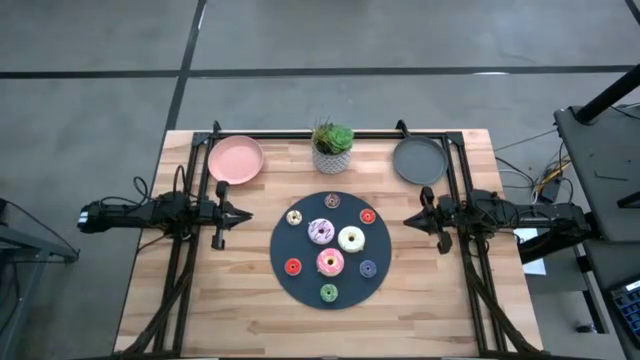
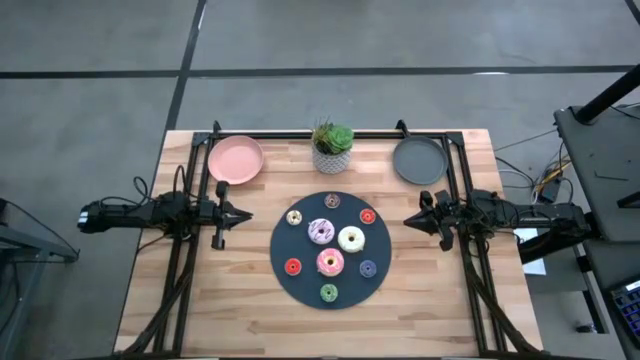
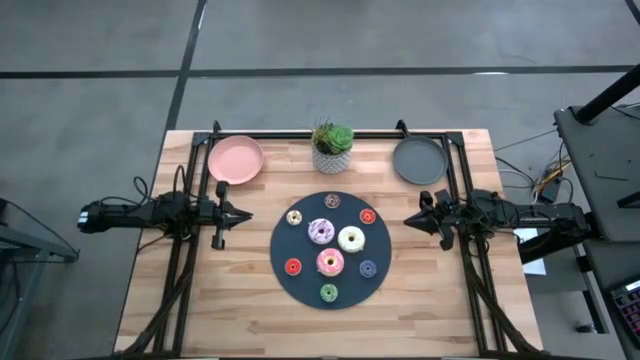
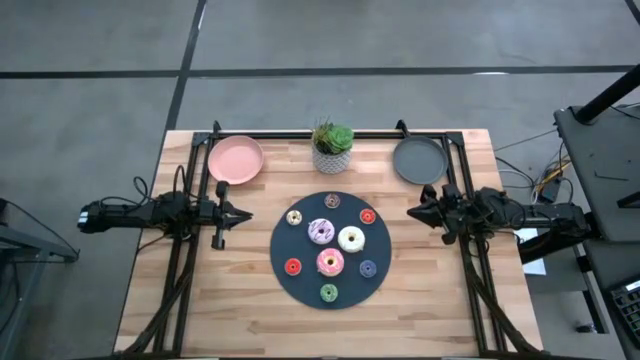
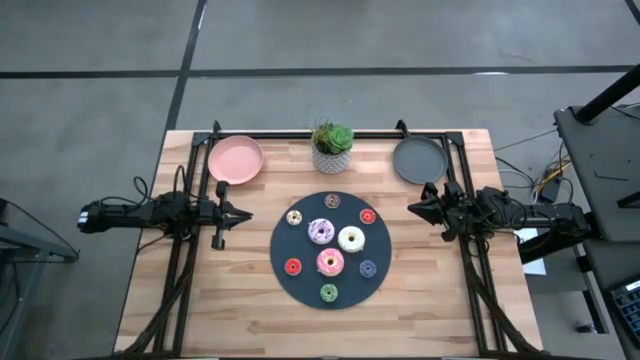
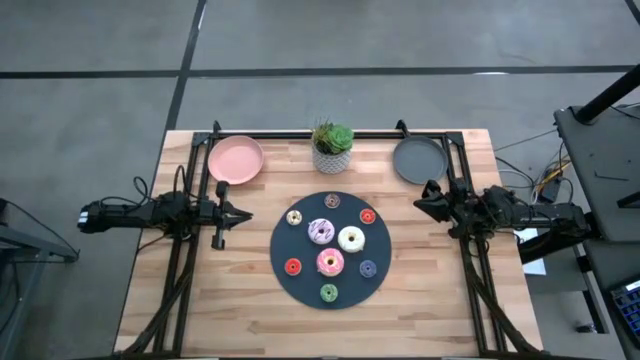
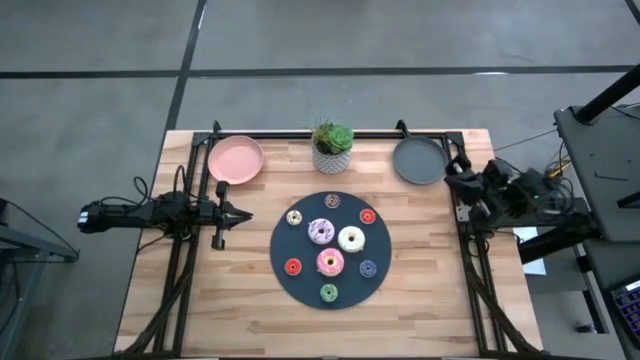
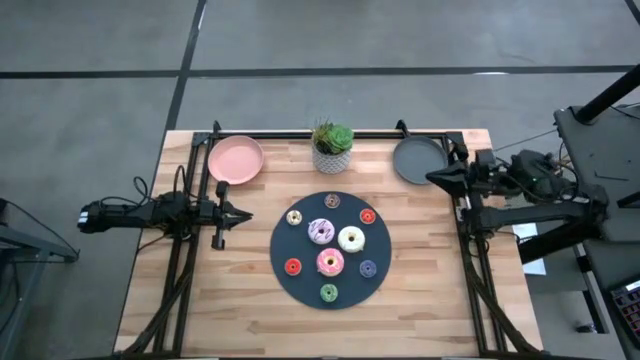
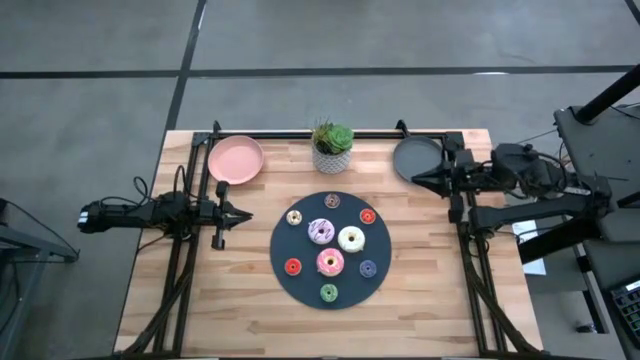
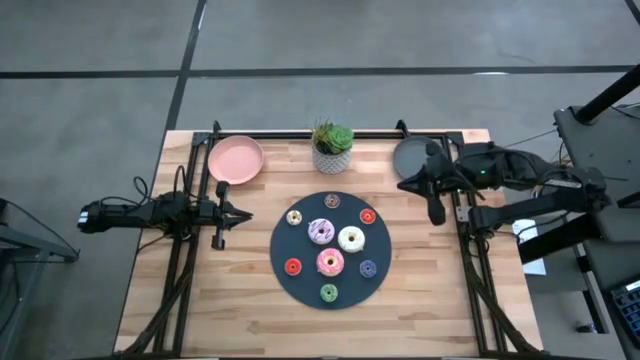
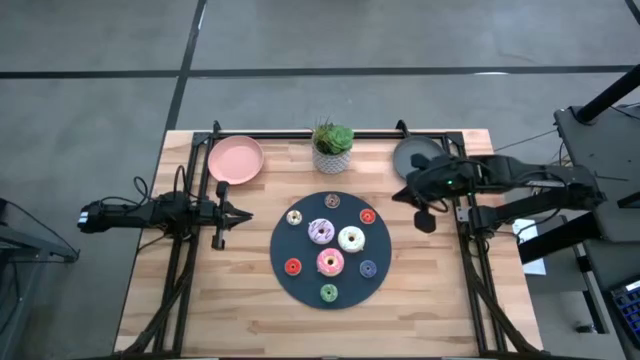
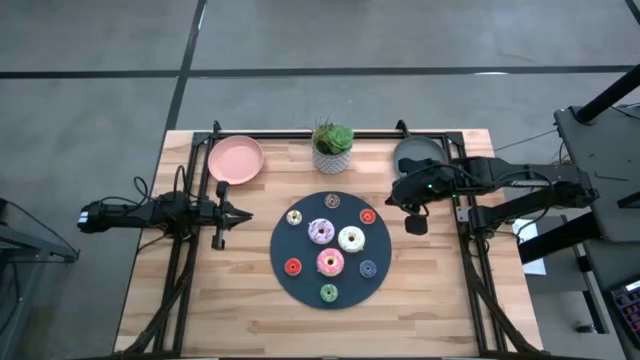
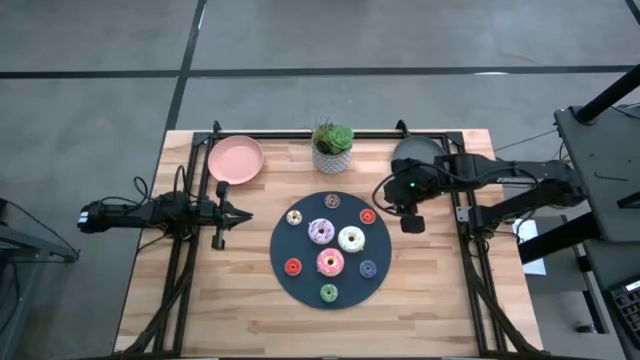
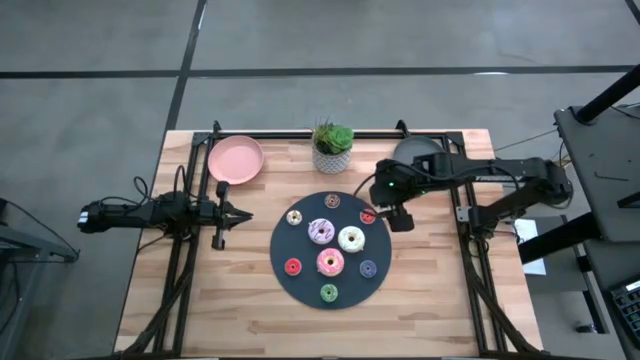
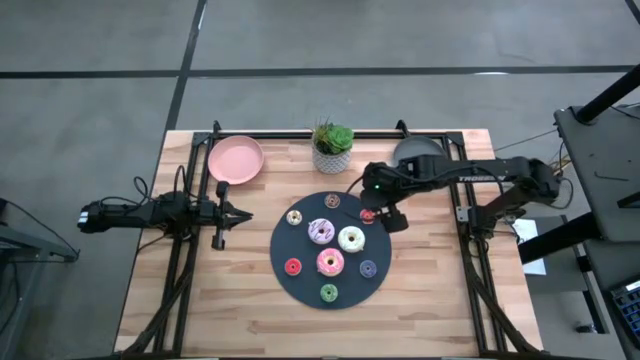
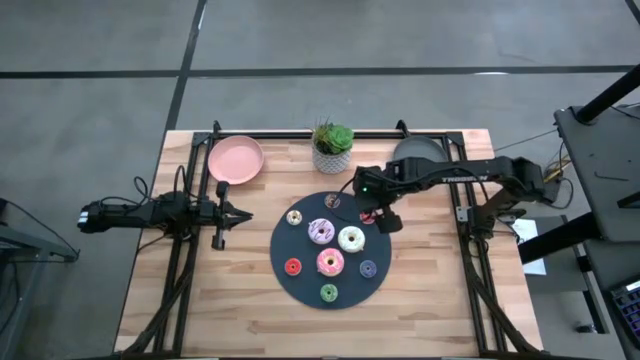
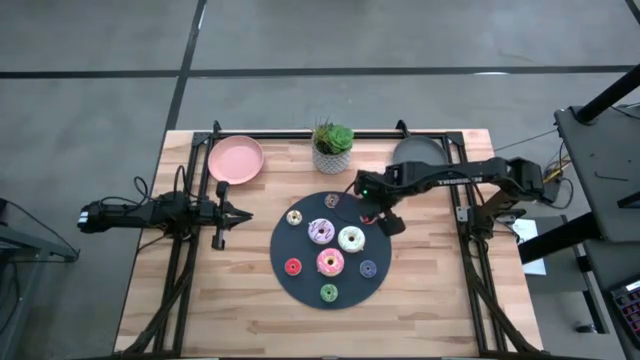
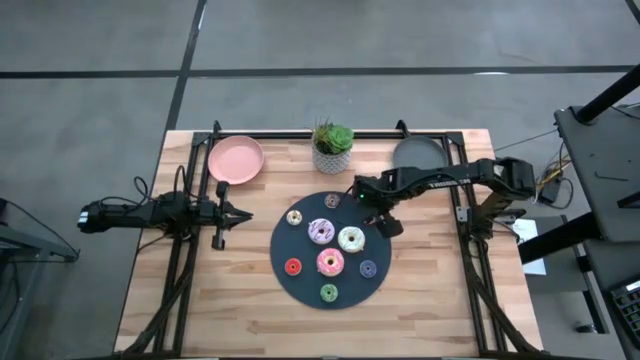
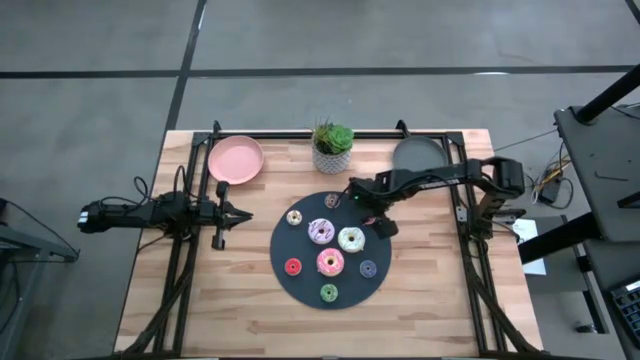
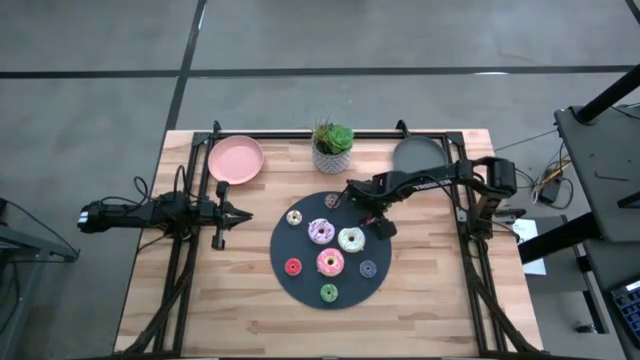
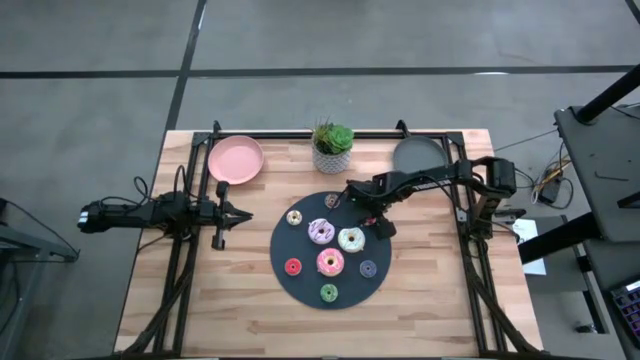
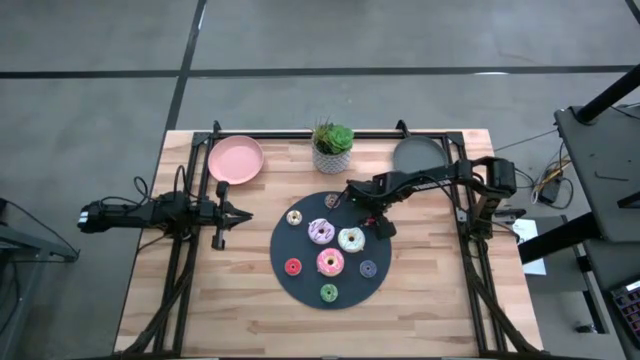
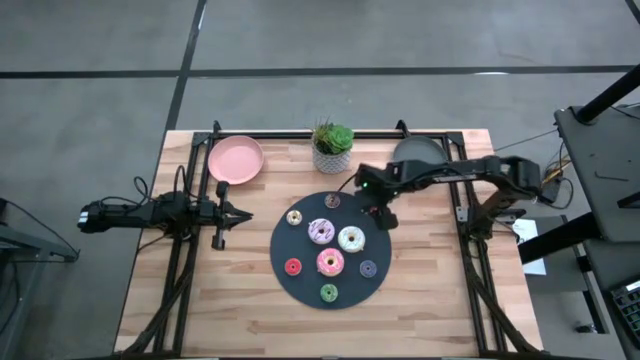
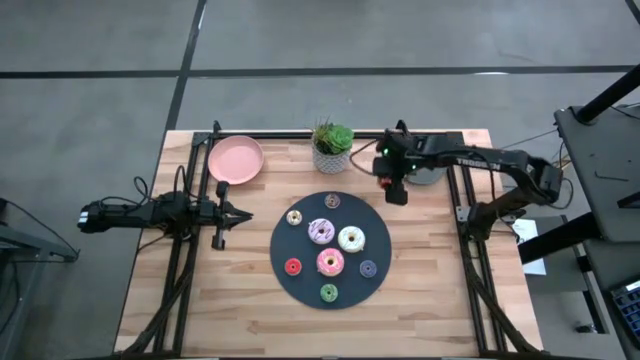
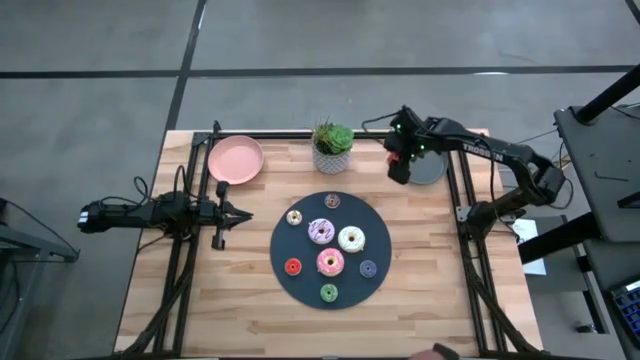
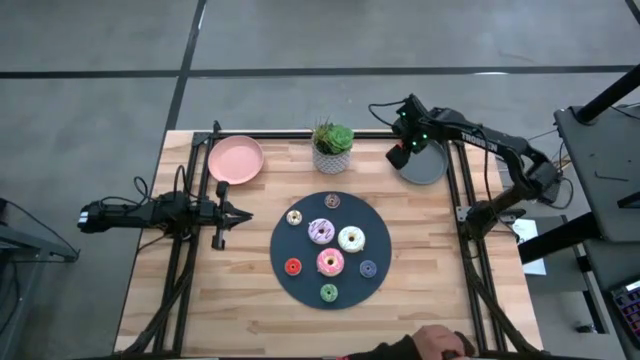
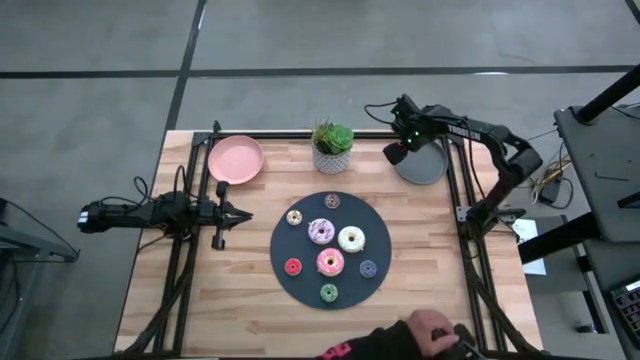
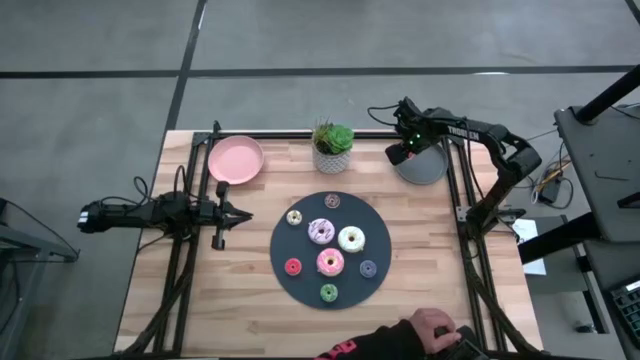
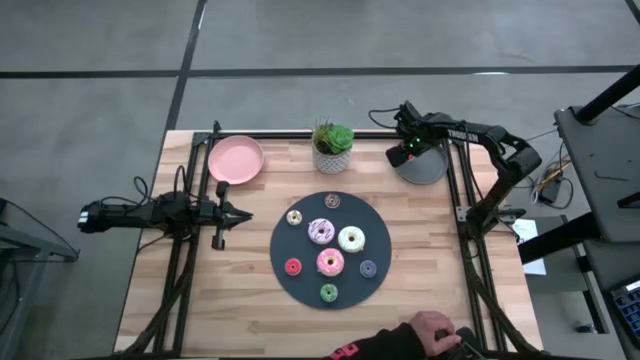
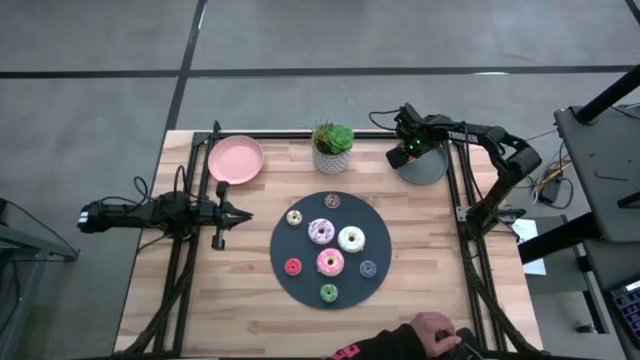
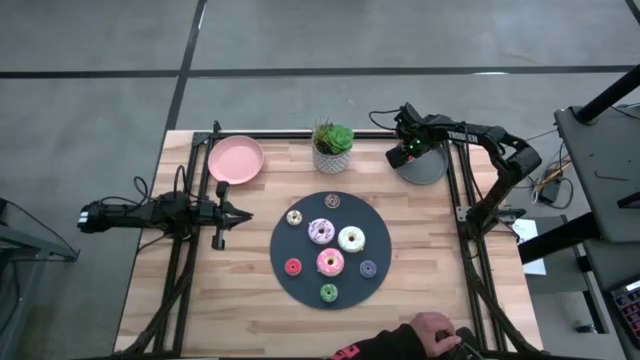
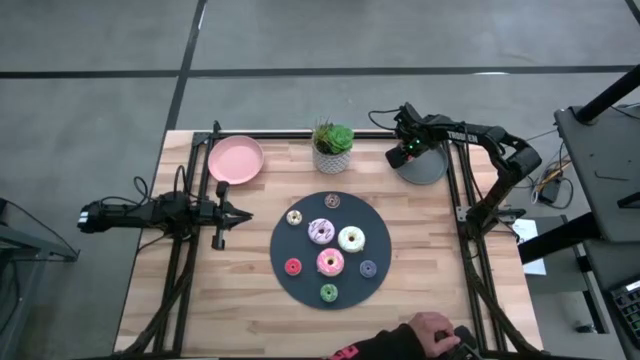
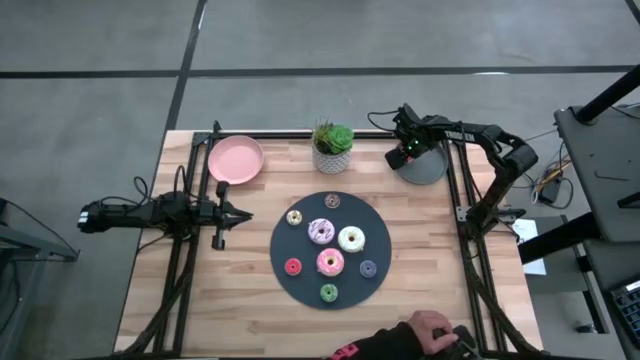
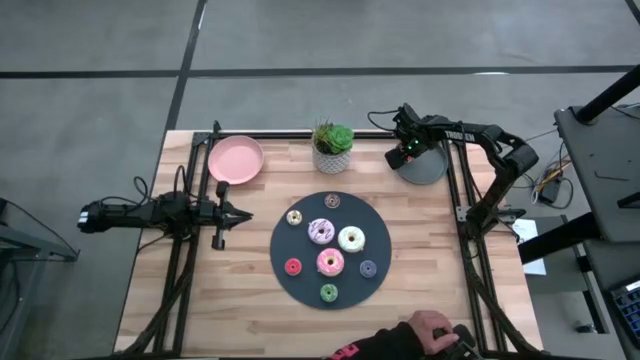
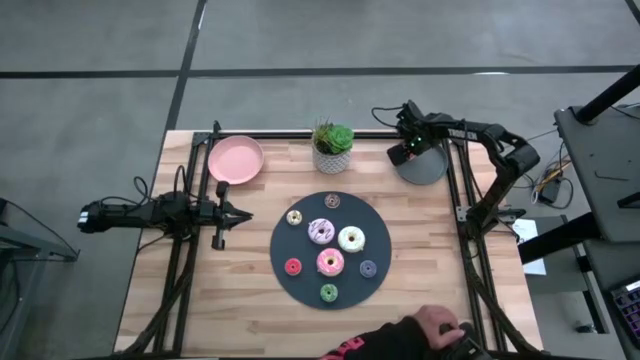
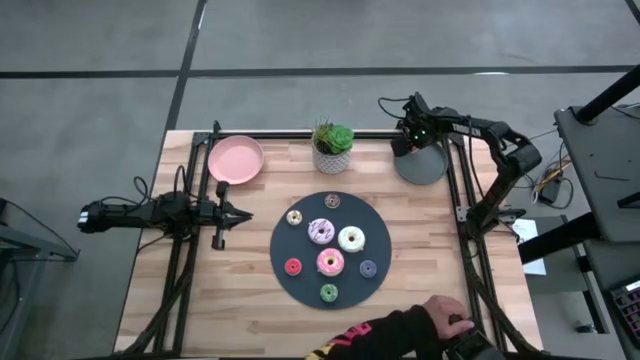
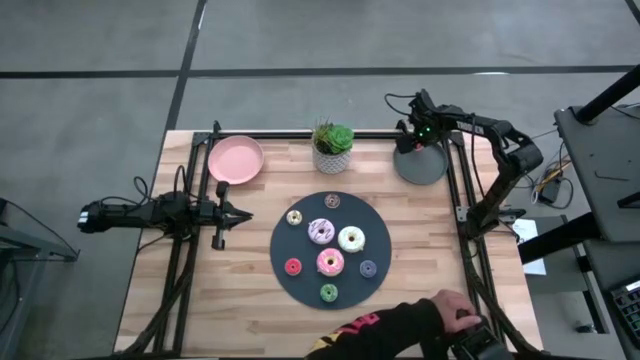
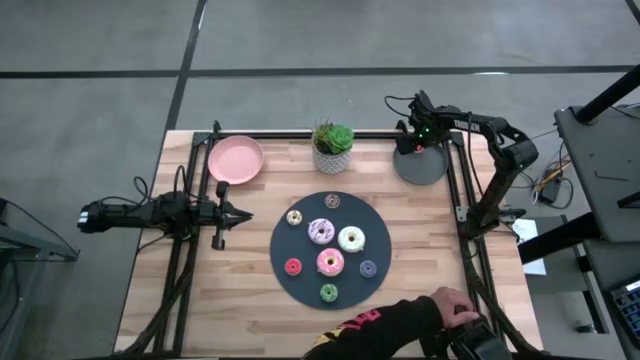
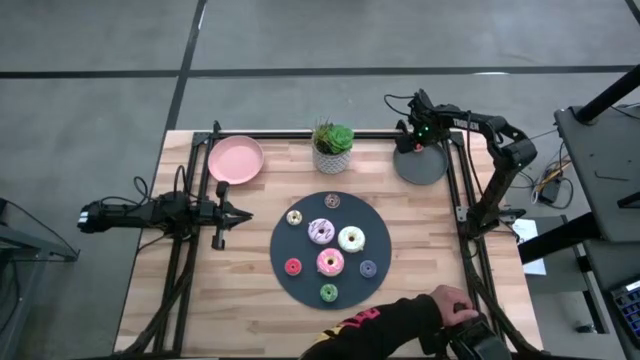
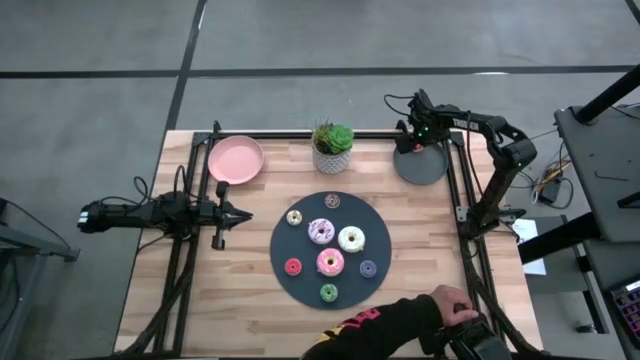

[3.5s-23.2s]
Task: Pick & Place donuts
Put the small orange donut on the gray plate

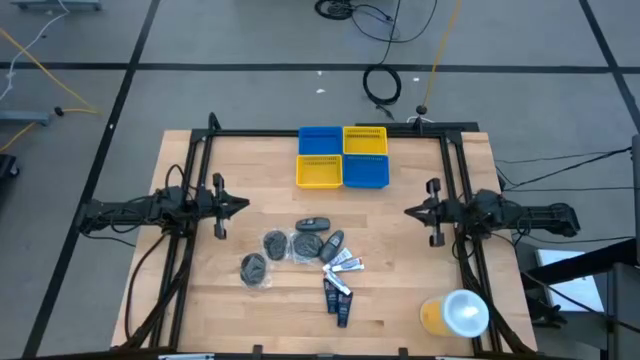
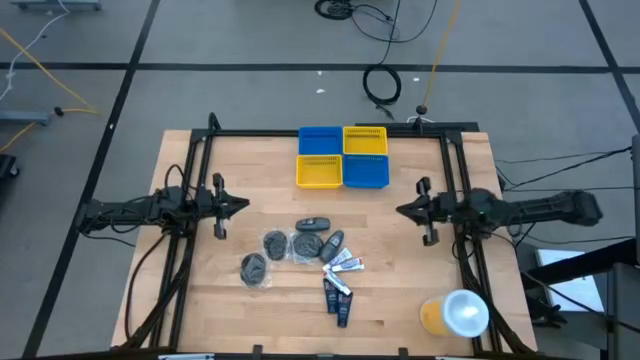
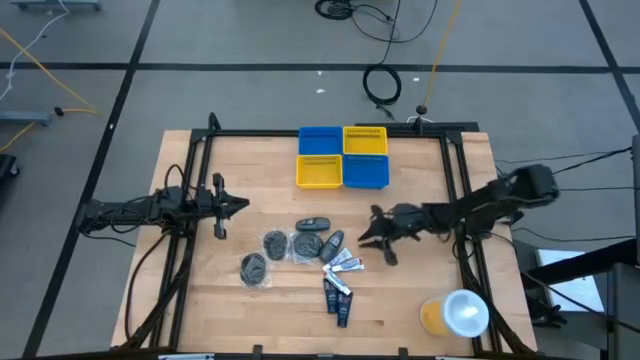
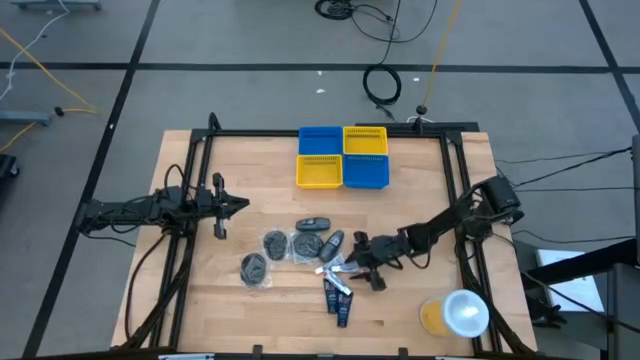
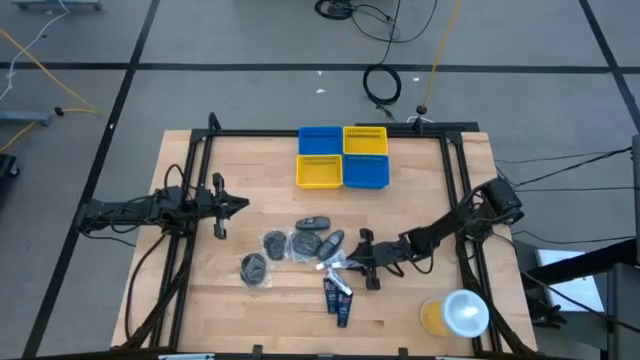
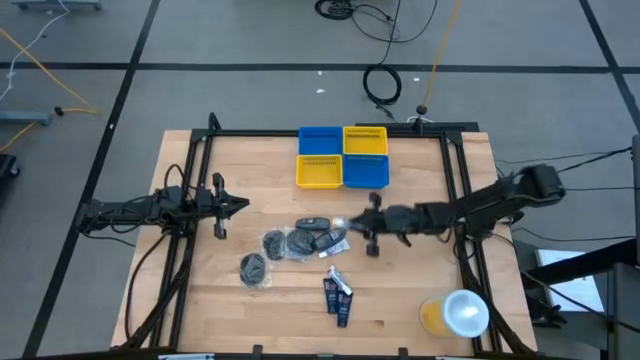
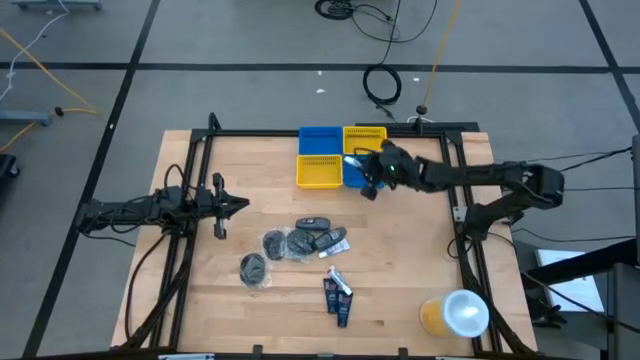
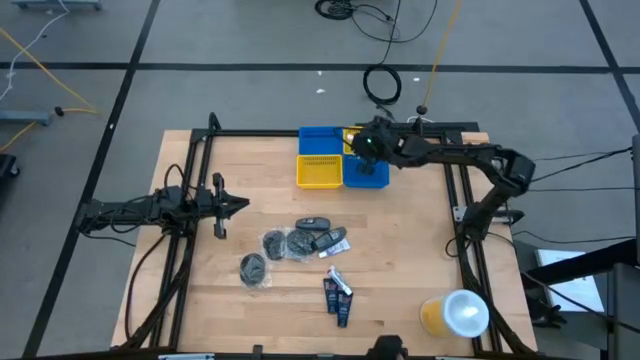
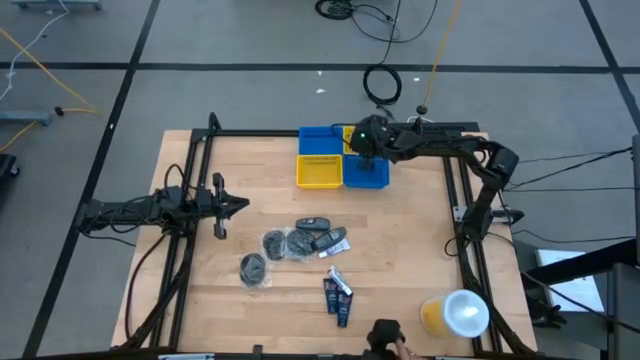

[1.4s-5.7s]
Task: Pick & Place Travel size toiletries
Put the white toothpaste into the right yellow bin
